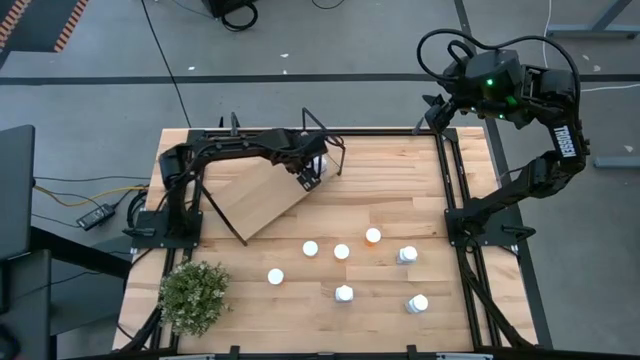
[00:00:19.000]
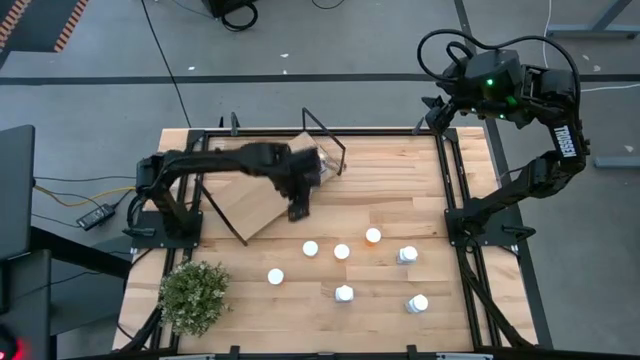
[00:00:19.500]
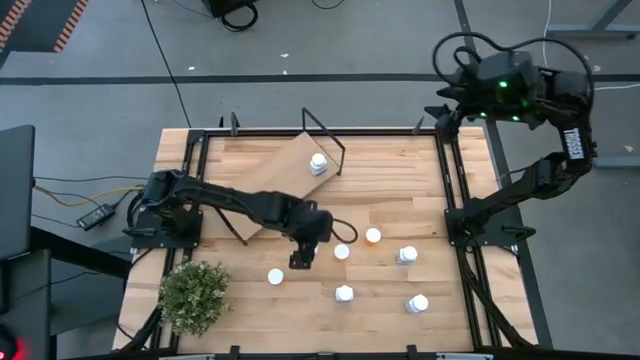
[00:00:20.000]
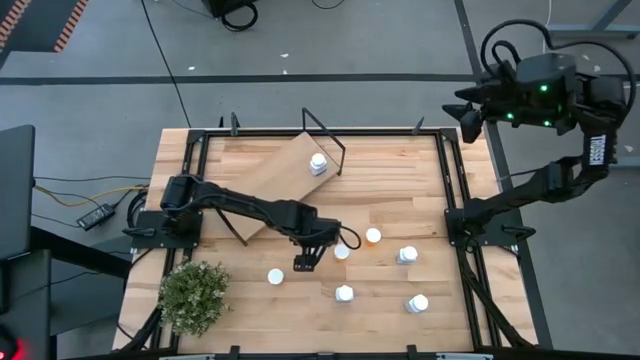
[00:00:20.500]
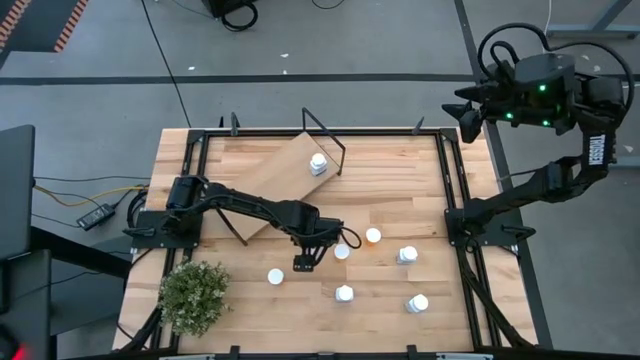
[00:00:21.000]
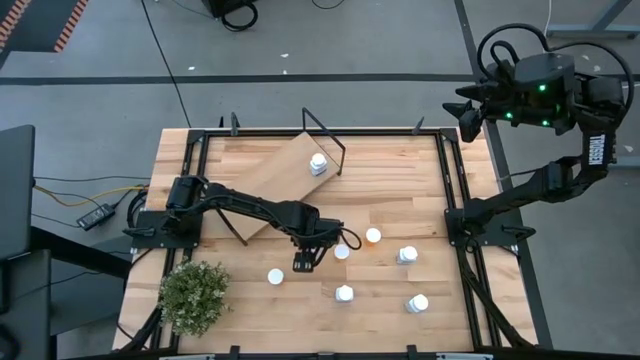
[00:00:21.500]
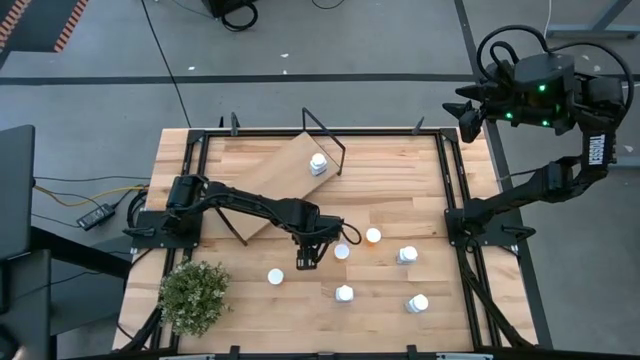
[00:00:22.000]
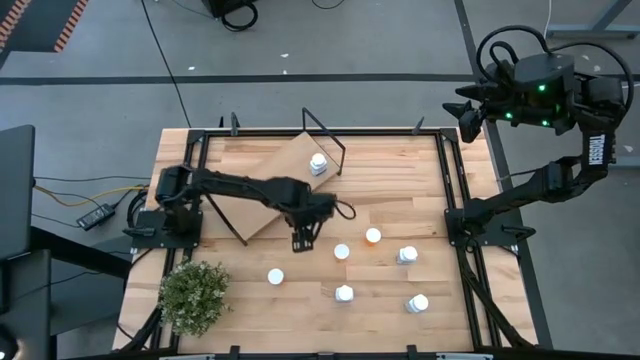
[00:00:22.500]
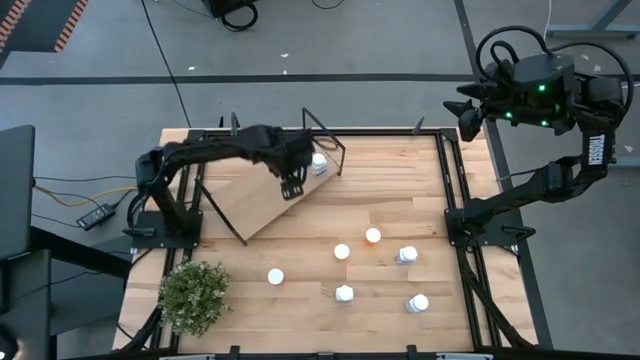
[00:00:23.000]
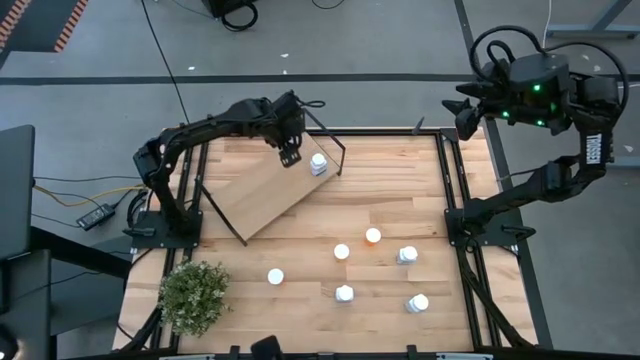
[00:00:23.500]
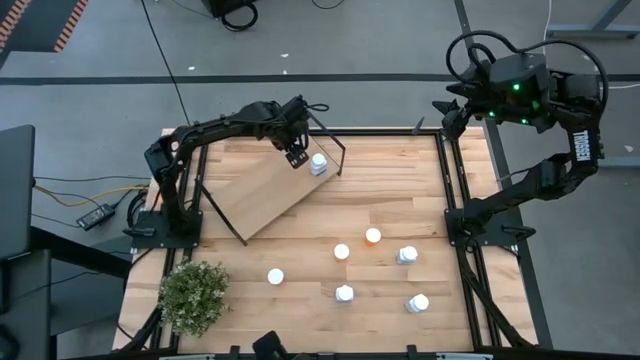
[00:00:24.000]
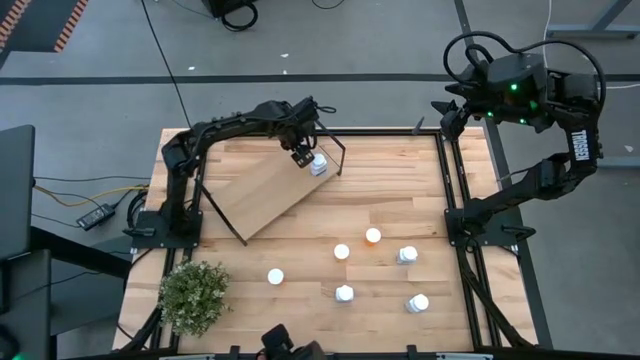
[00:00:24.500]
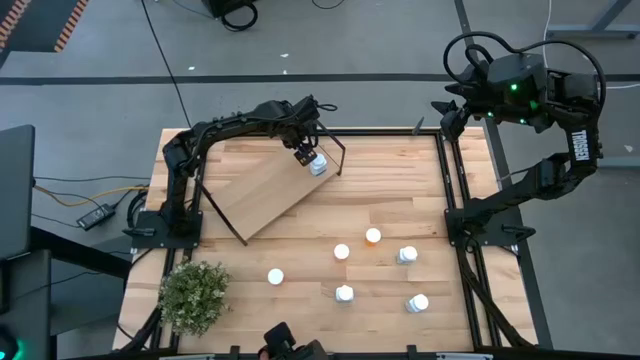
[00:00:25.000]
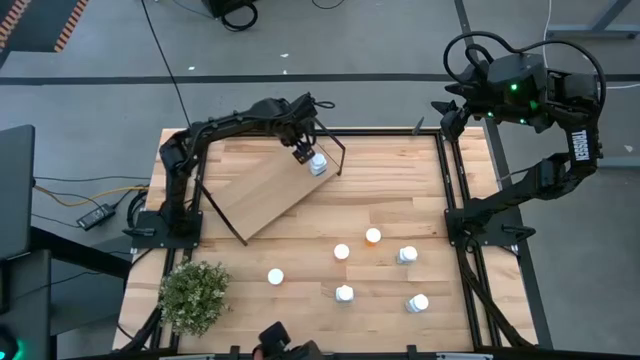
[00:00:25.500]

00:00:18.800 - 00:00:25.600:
Task: Pick and place medicine bottles onto shelf by color
Put the orange pill bottle on the shelf

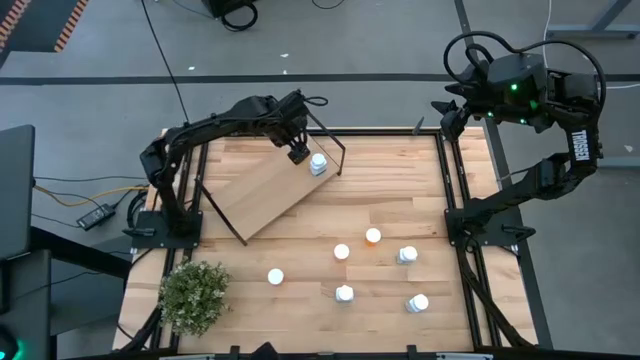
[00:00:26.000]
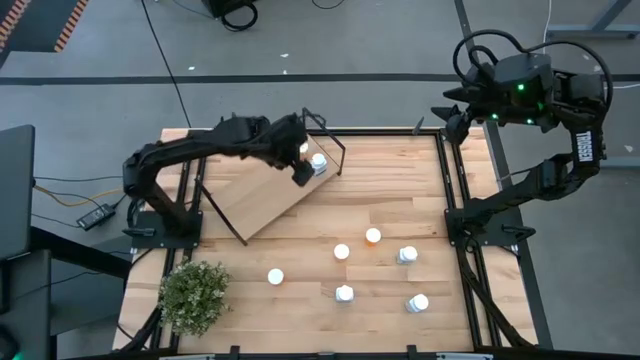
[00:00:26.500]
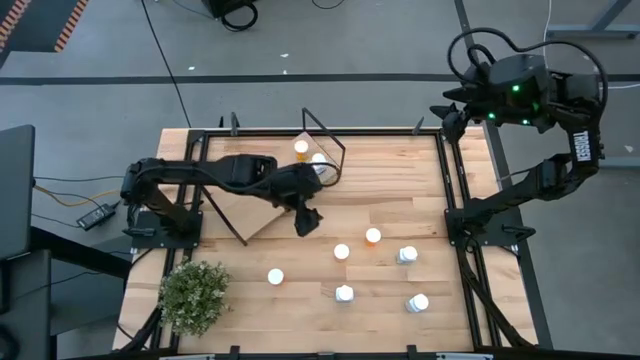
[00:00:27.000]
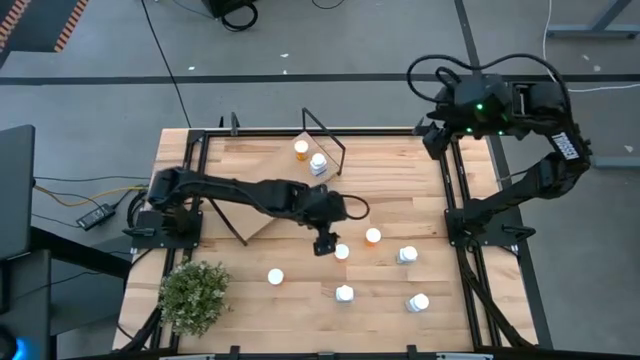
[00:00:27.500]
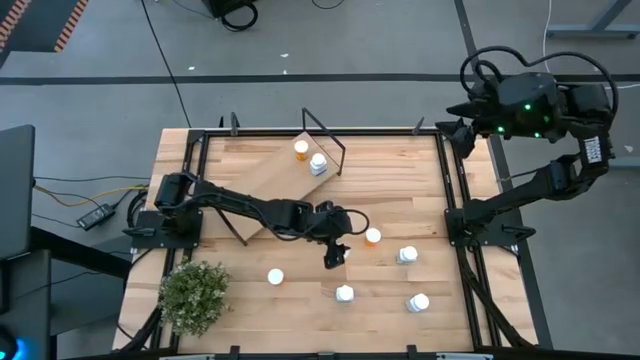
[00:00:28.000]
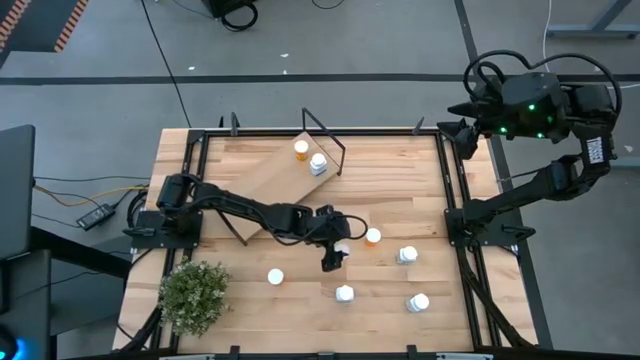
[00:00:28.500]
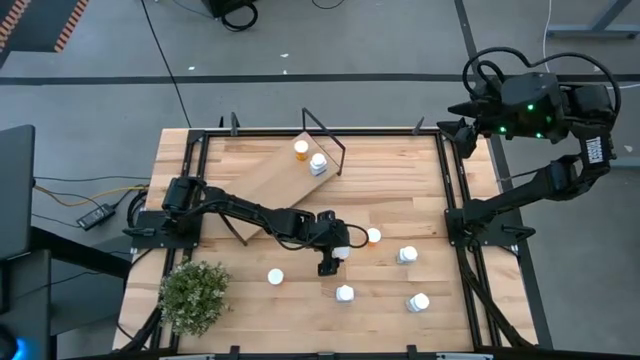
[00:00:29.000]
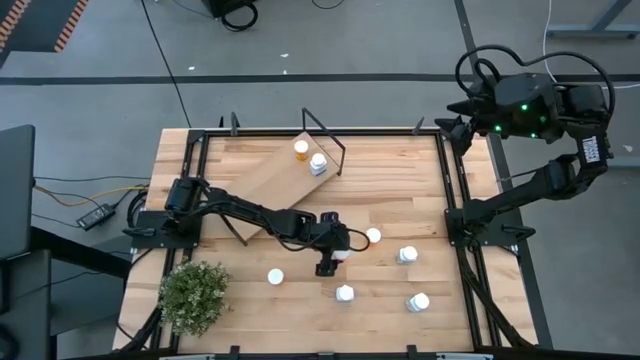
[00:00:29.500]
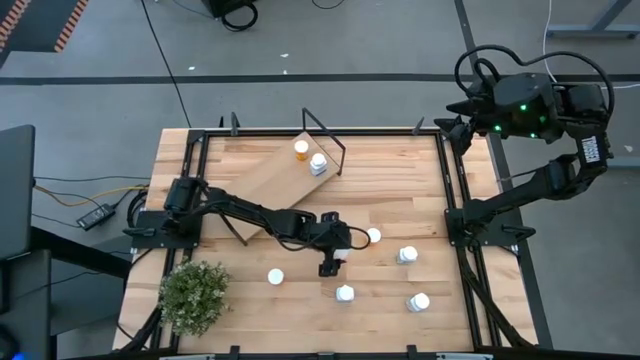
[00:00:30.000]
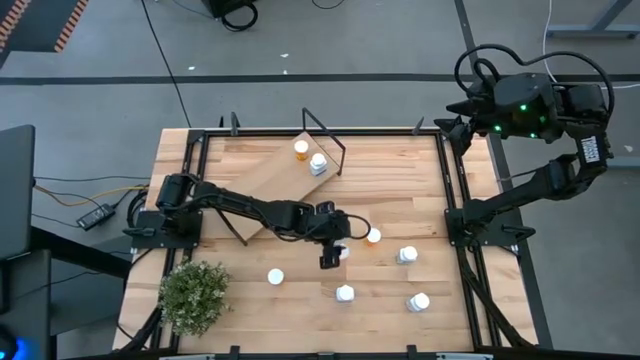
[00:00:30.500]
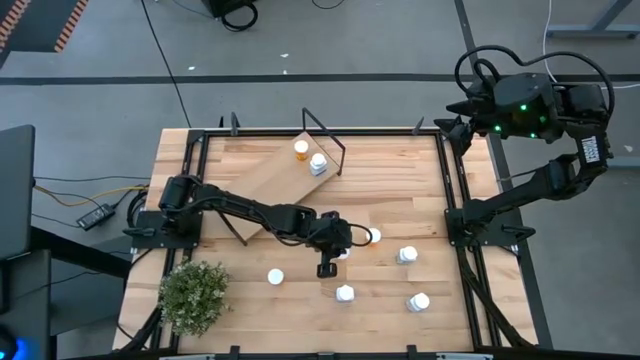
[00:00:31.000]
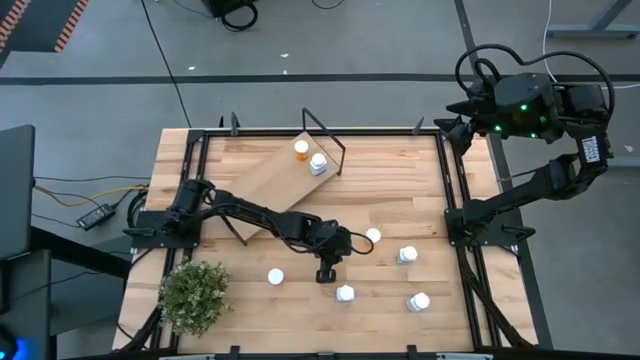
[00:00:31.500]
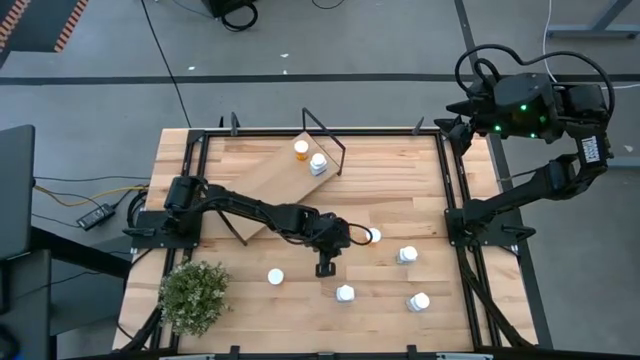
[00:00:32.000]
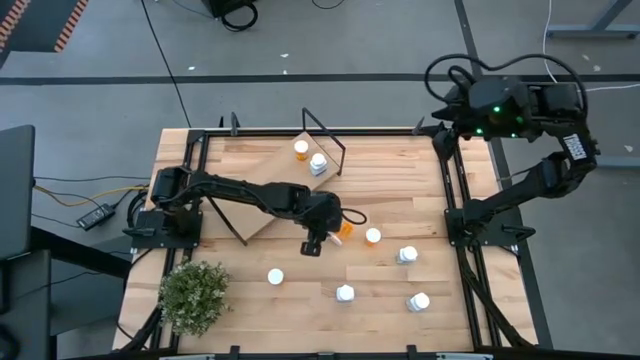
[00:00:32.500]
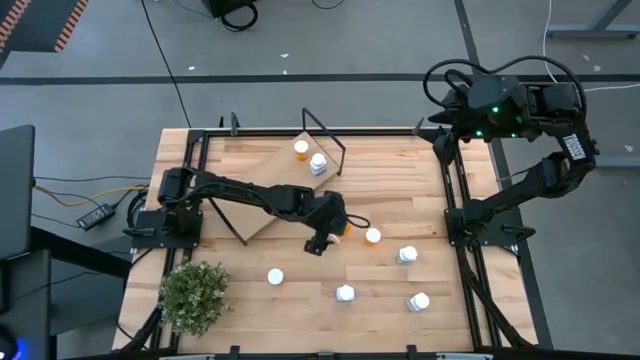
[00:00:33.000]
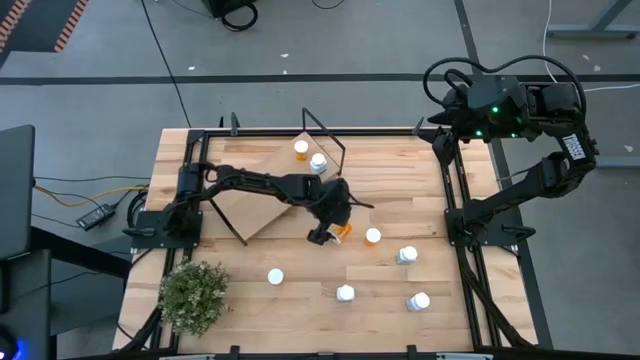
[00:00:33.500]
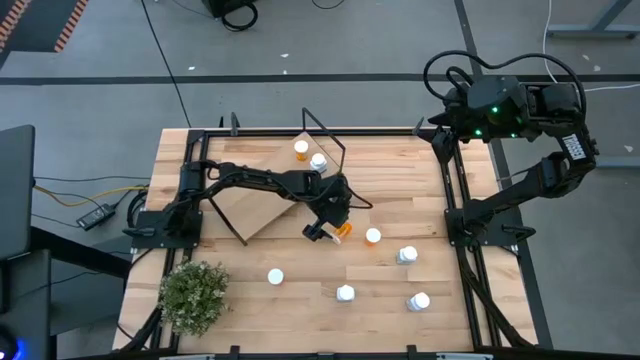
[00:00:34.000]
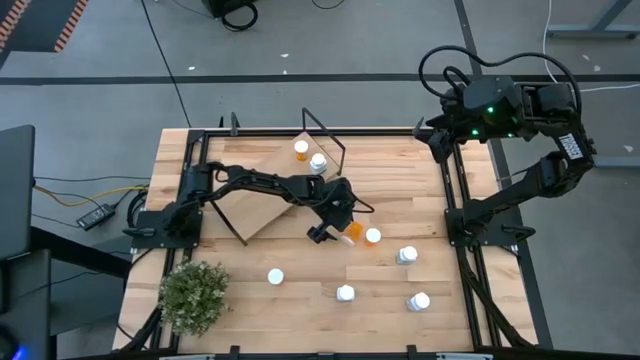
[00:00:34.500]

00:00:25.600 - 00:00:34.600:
Put the orange pill bottle on the shelf

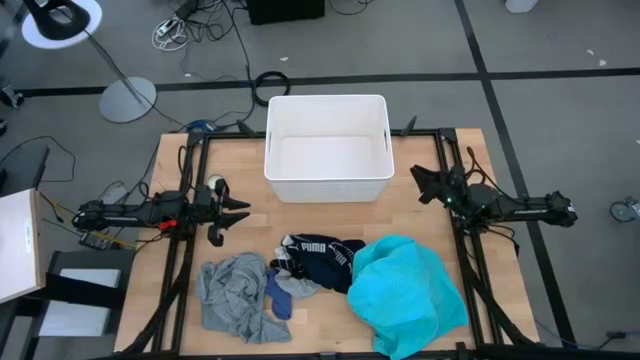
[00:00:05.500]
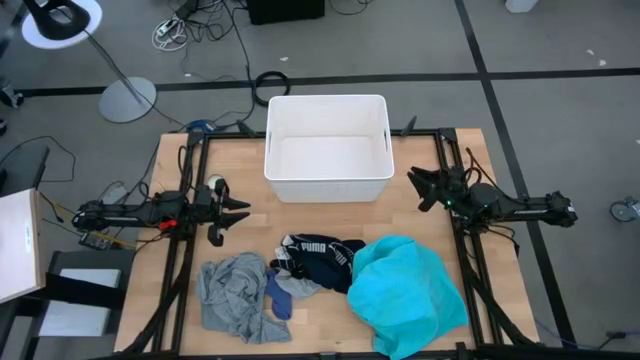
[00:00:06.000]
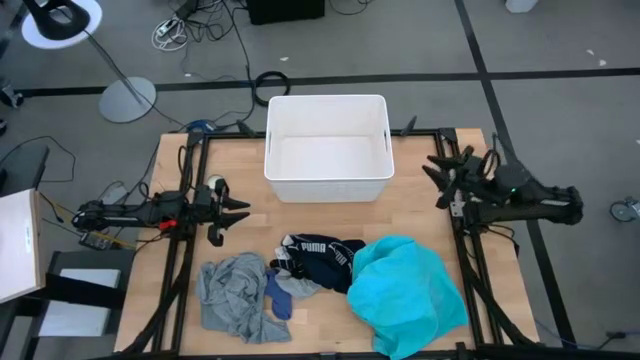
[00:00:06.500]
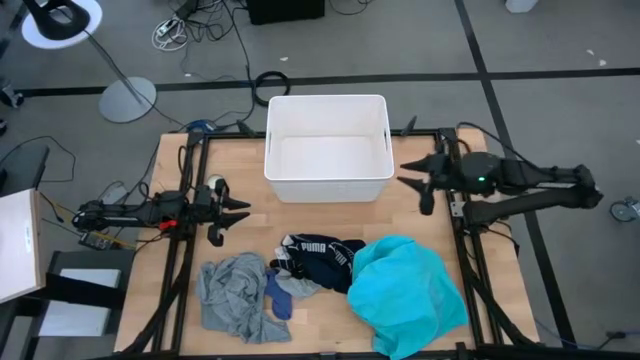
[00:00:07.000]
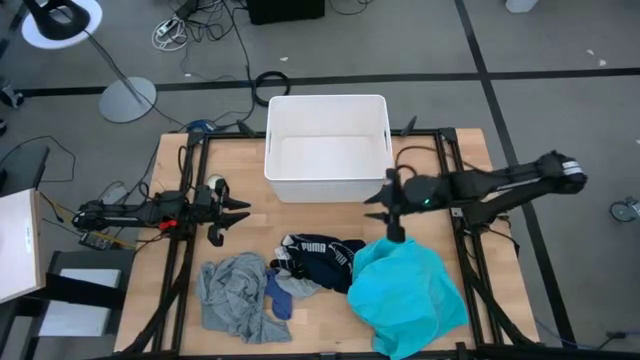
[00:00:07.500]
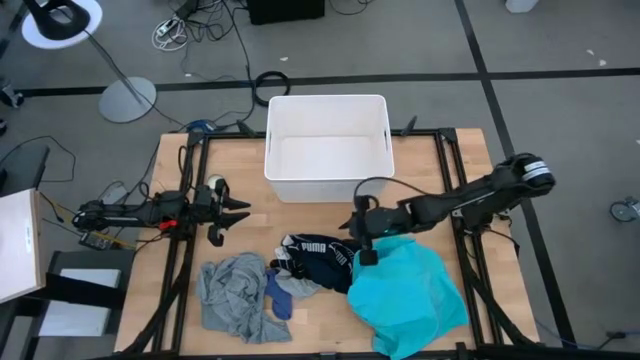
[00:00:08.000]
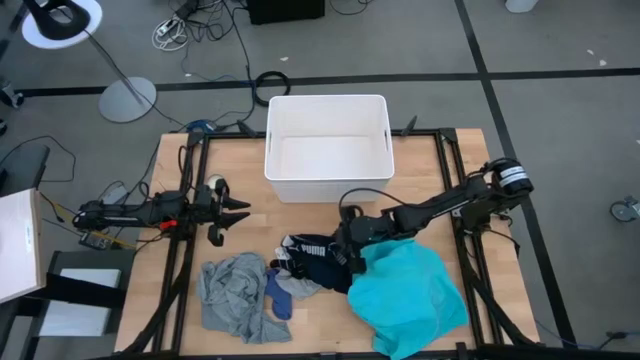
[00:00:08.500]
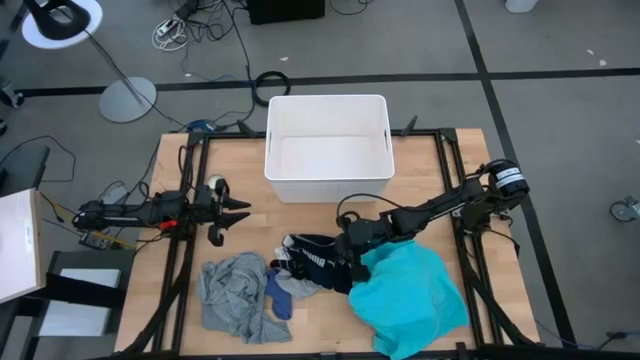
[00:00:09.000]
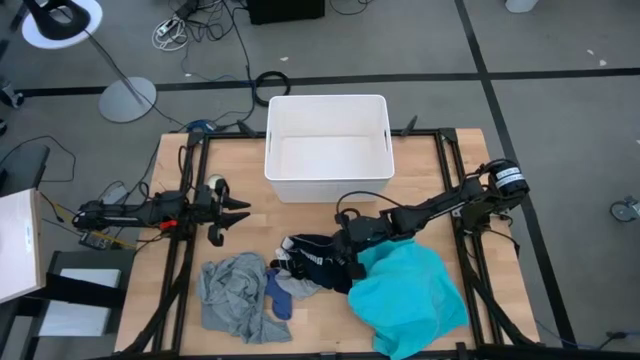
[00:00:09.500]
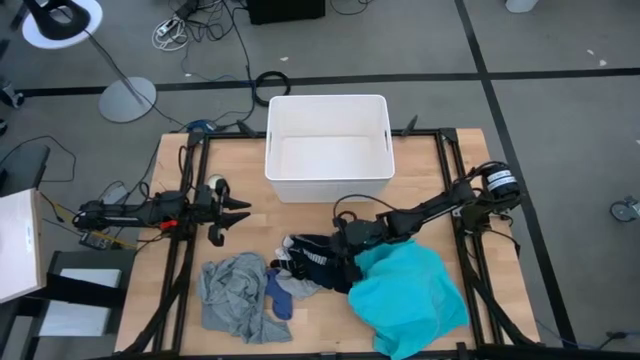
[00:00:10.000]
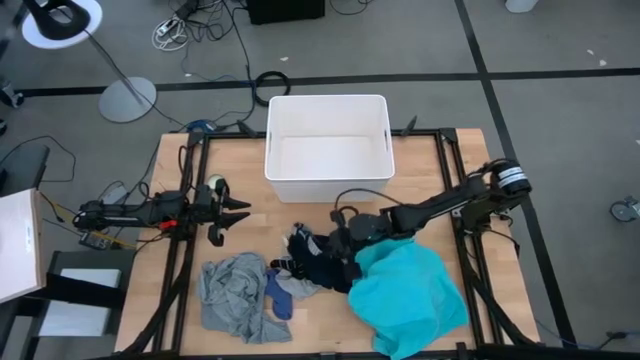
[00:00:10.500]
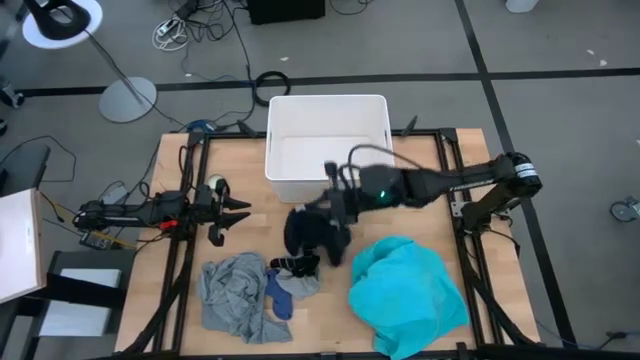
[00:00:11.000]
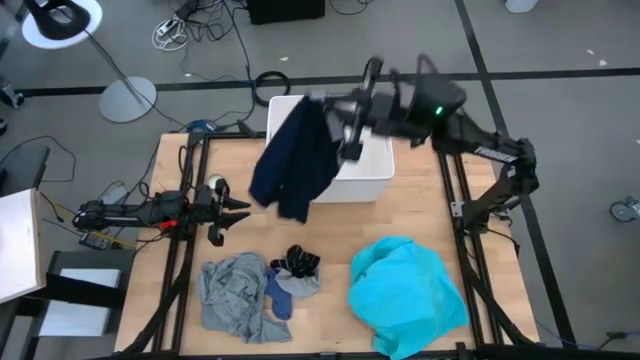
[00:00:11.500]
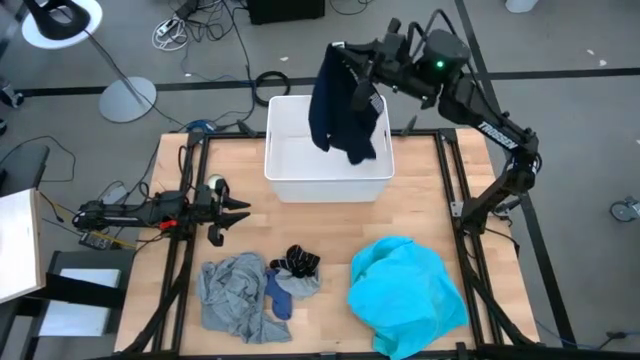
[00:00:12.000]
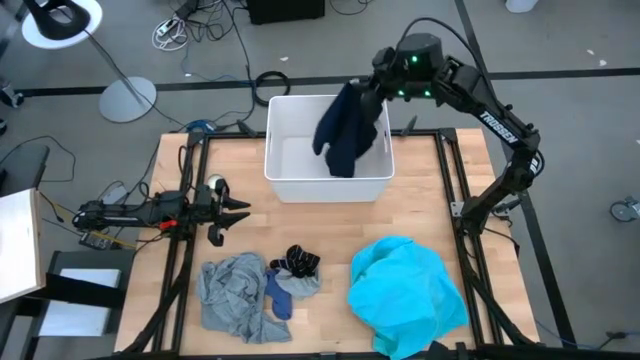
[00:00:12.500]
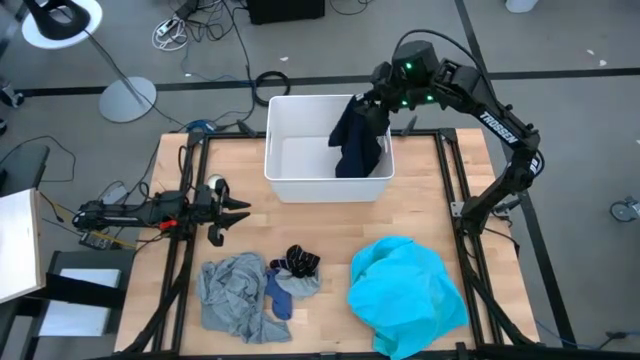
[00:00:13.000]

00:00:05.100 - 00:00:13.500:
Task: Sort clothes
Put the dark blue boxer into the white laundry bin
